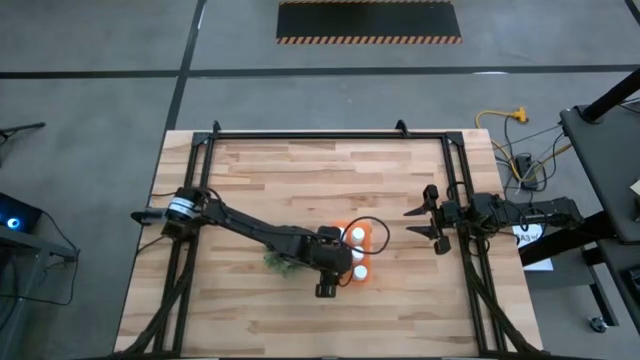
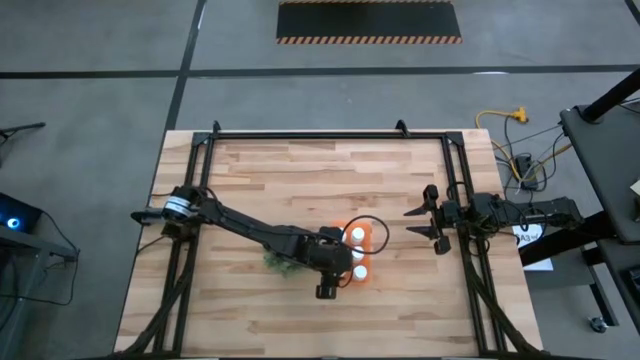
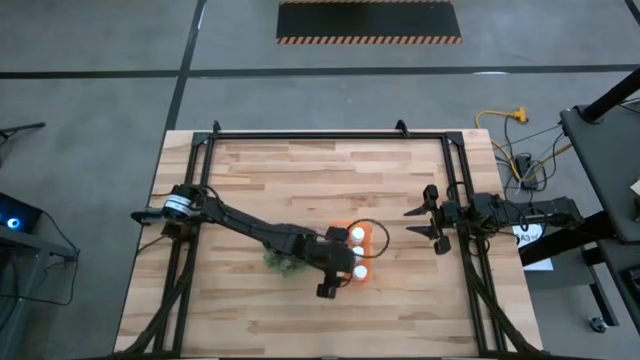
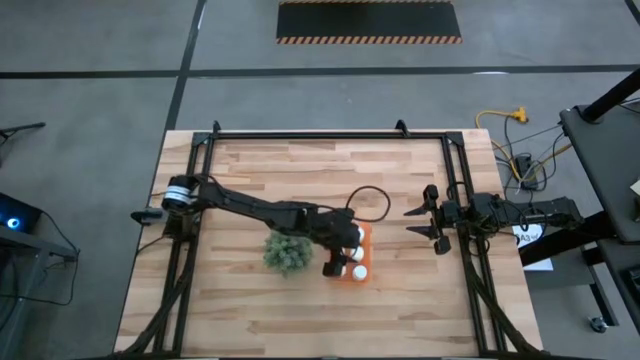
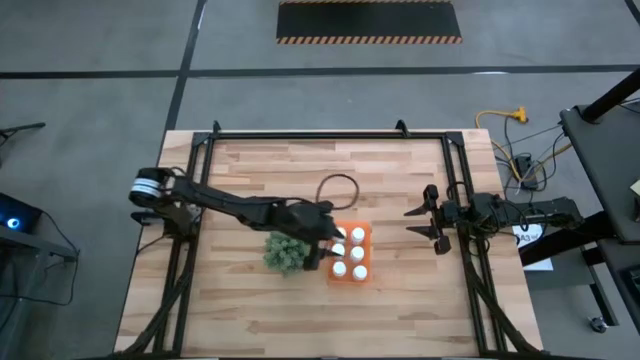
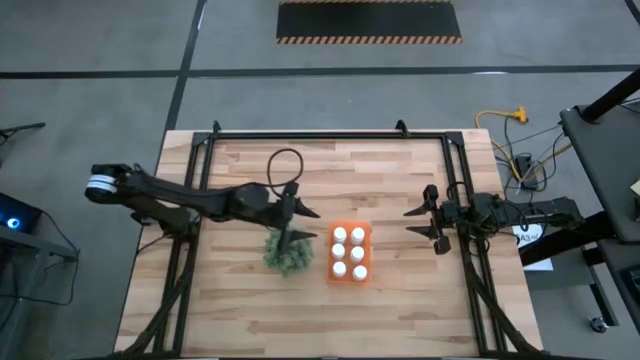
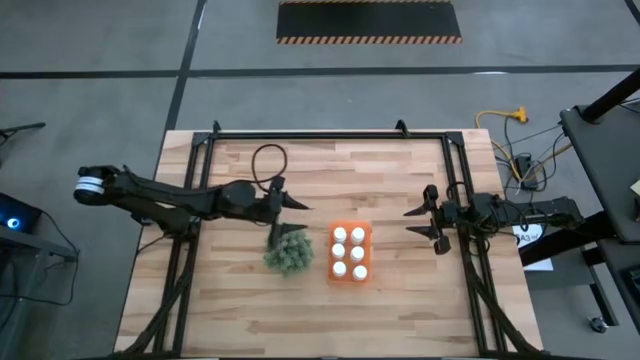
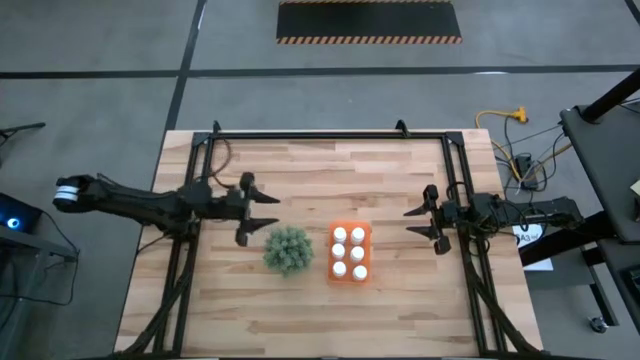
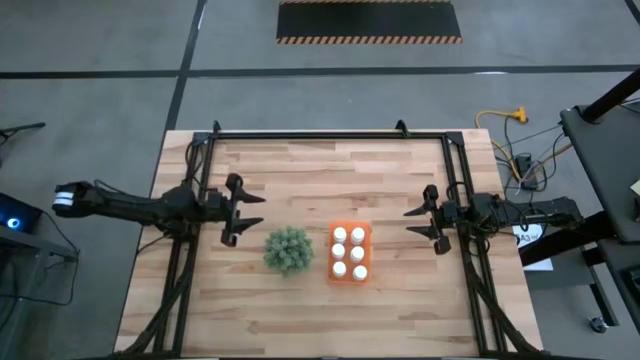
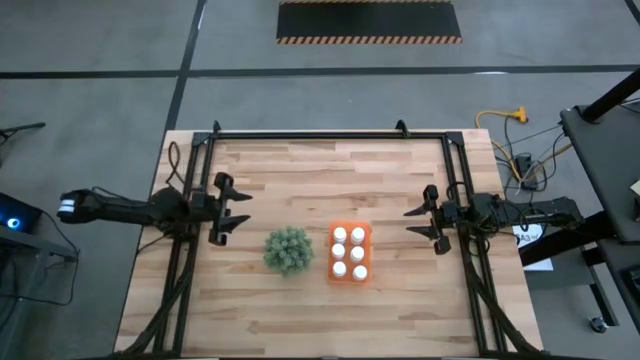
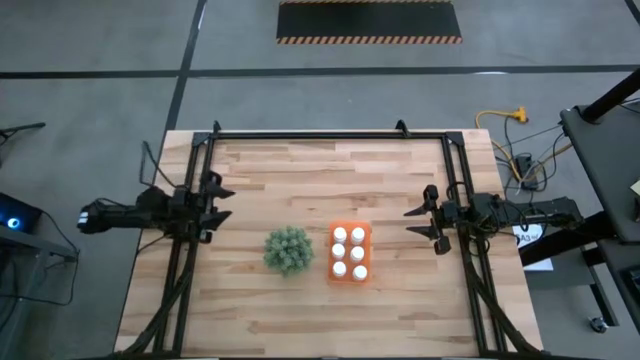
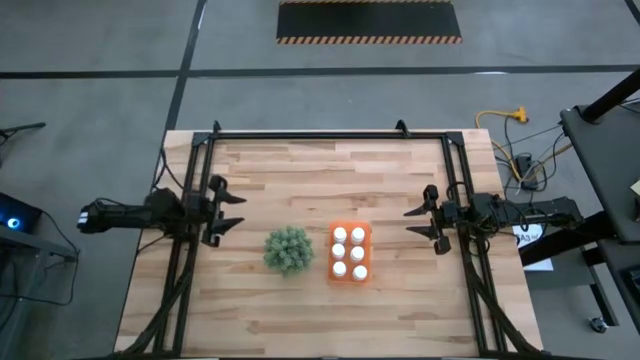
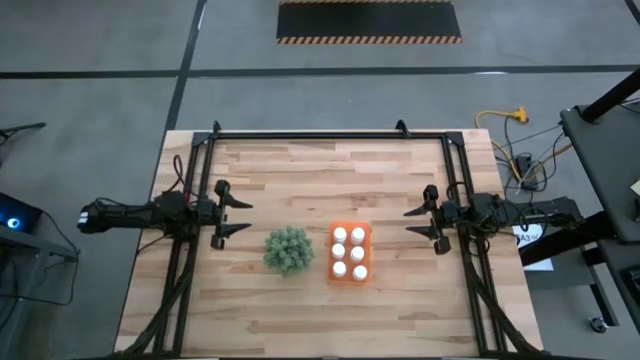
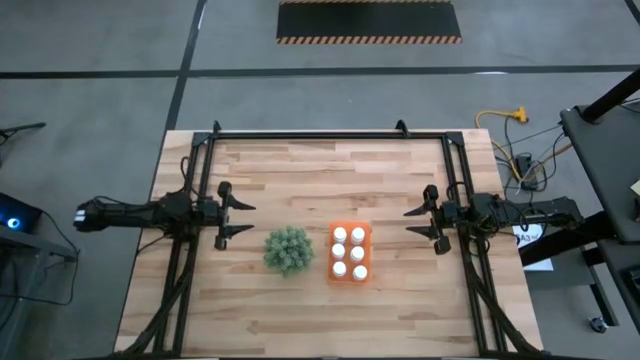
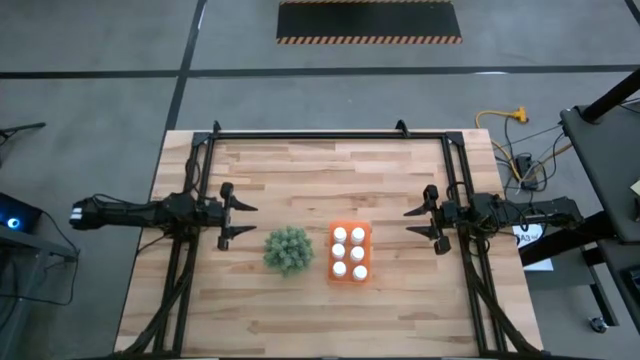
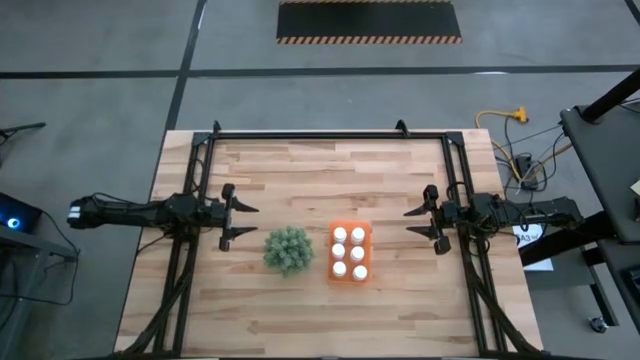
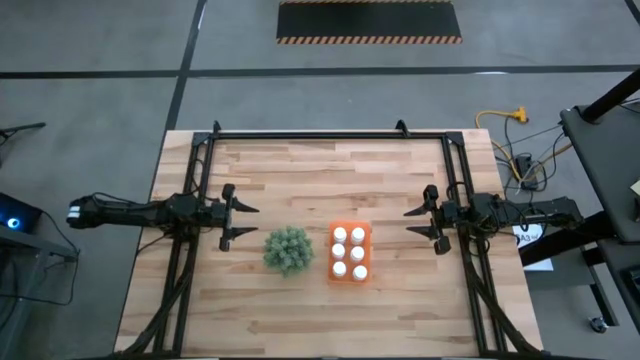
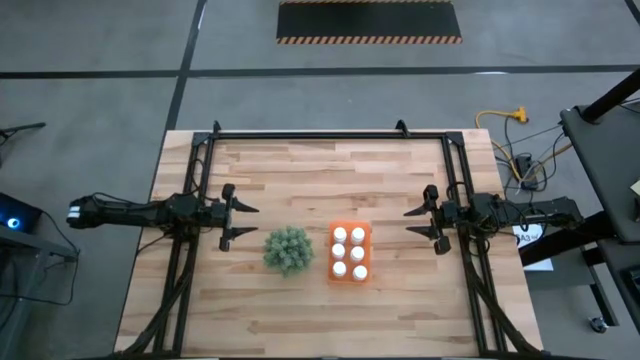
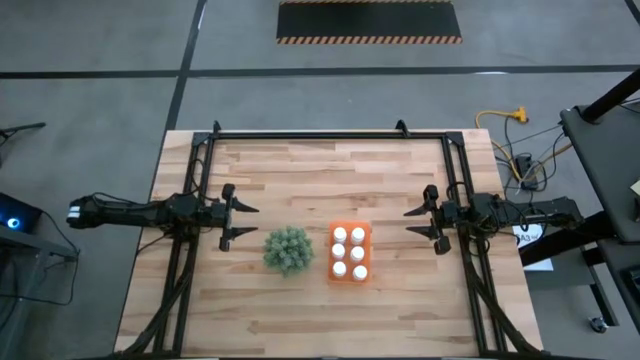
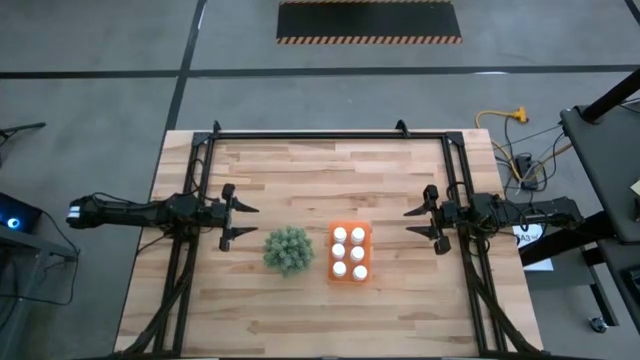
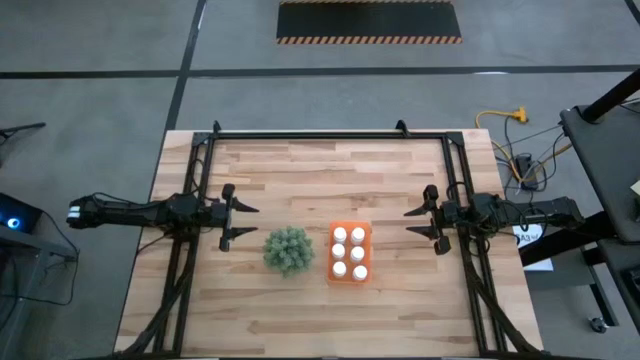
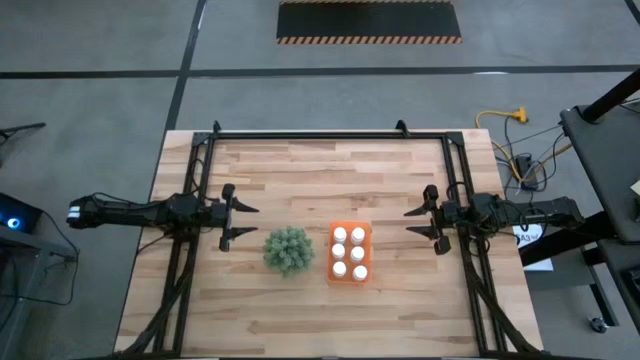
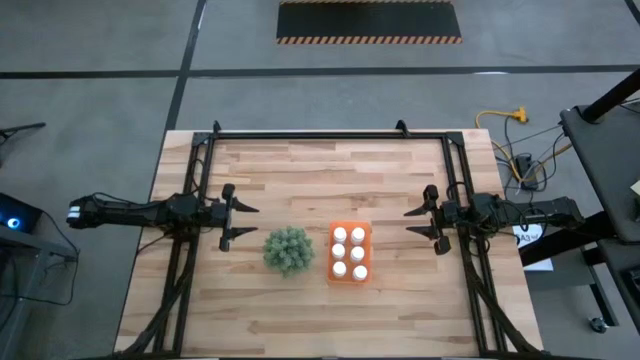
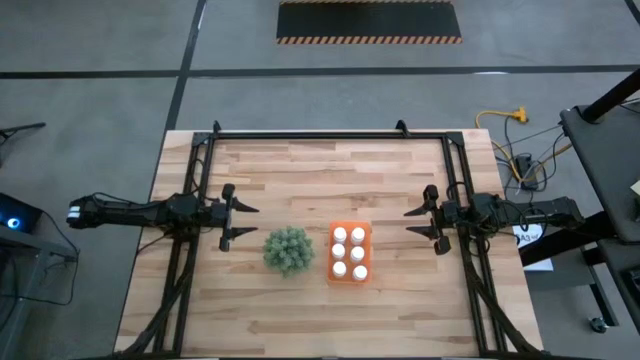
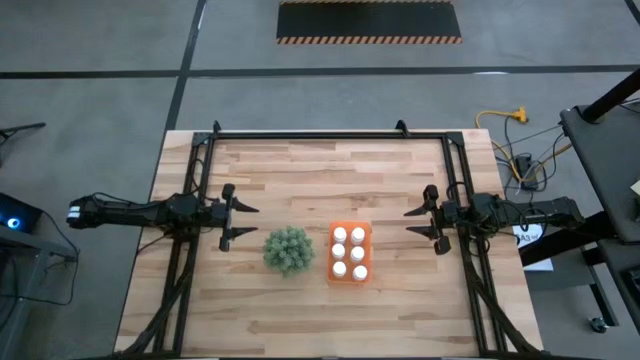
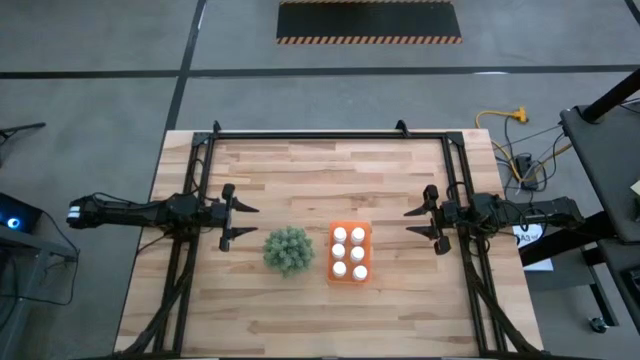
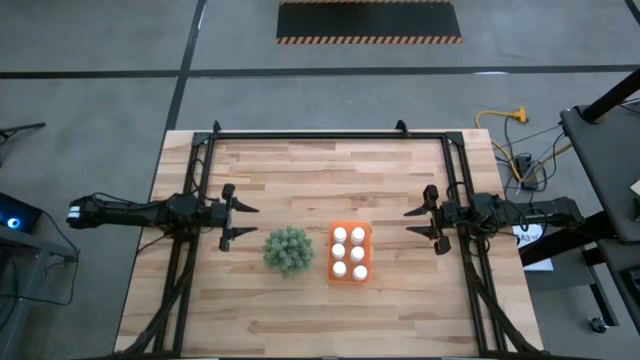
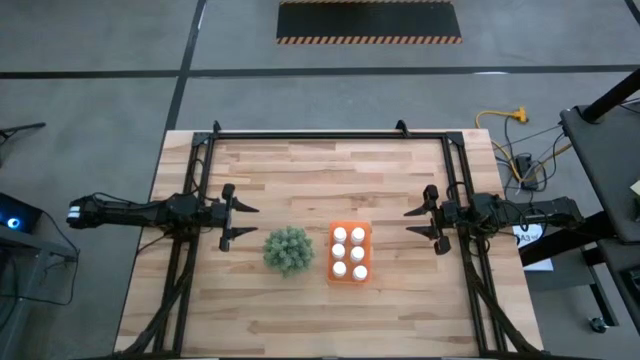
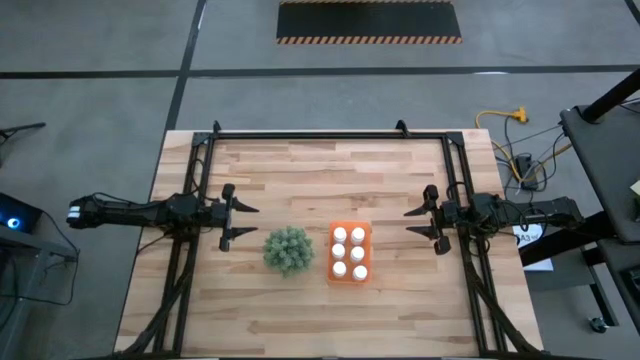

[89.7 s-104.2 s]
Task: Pick and place pill bottles into a basket
Return to Home Position

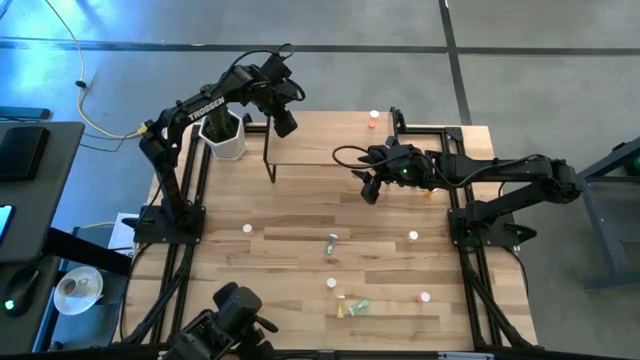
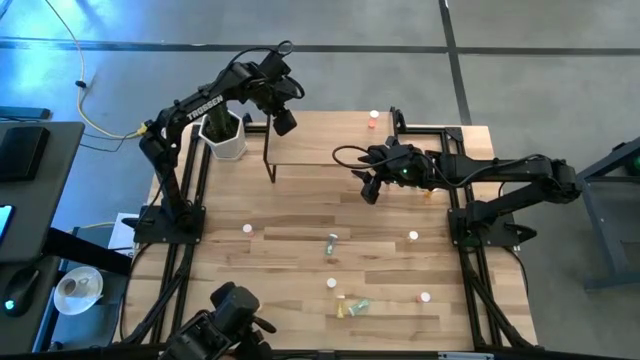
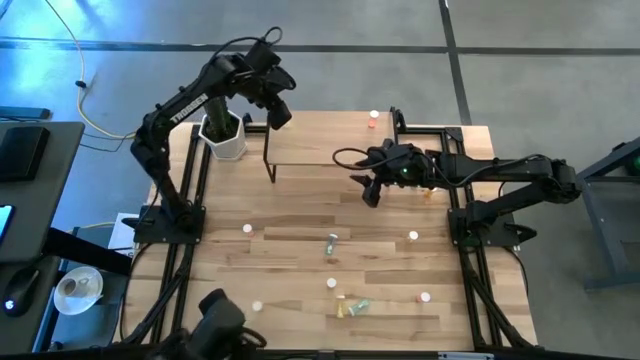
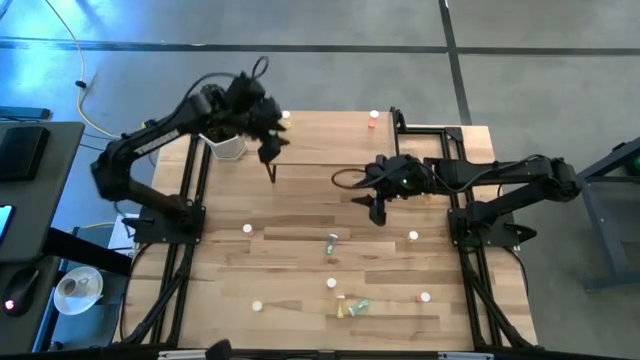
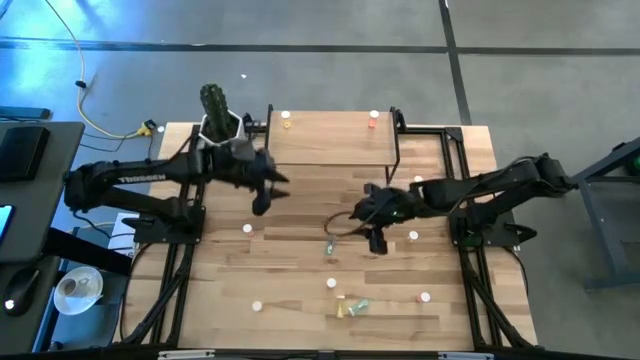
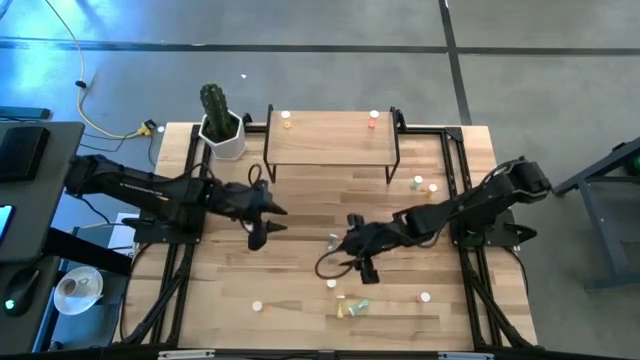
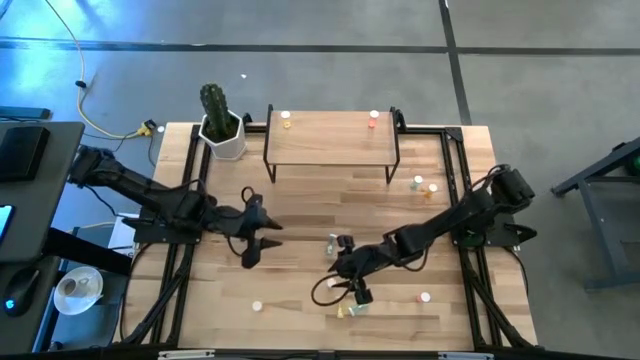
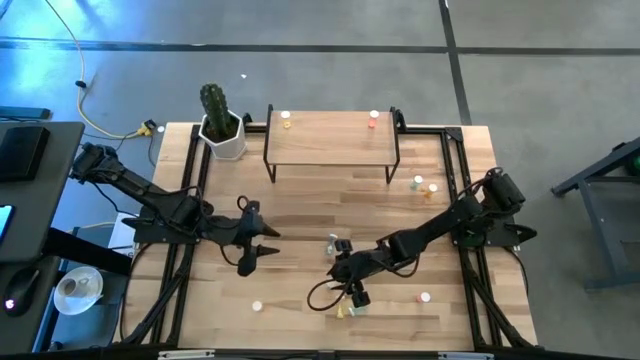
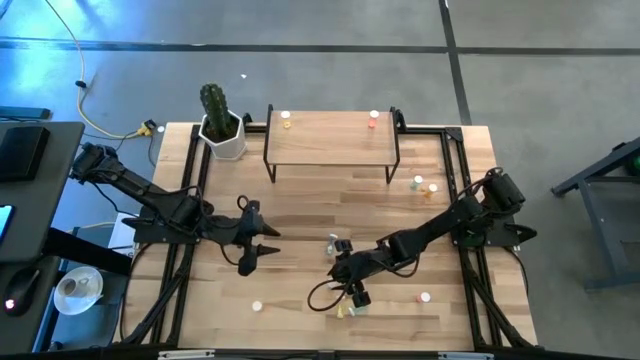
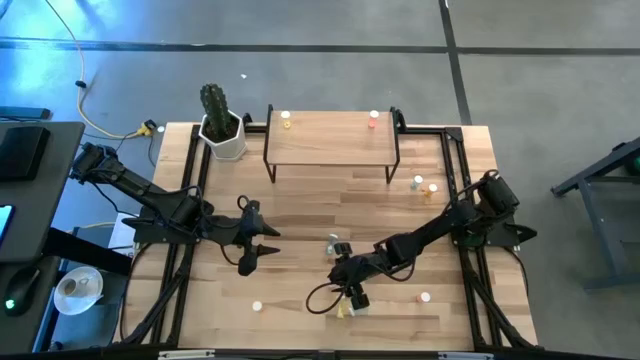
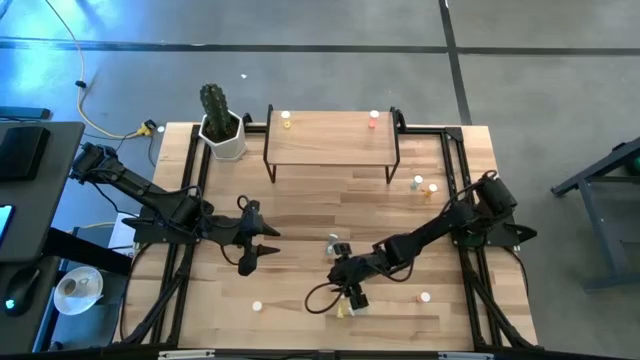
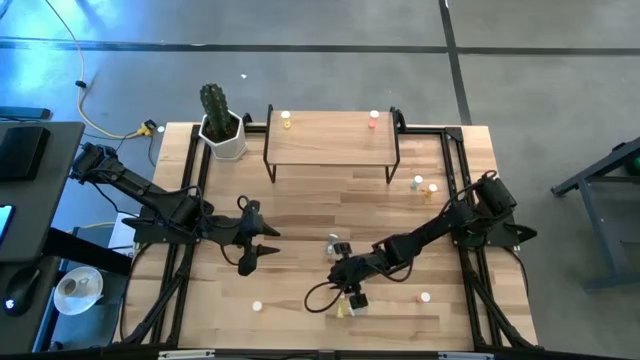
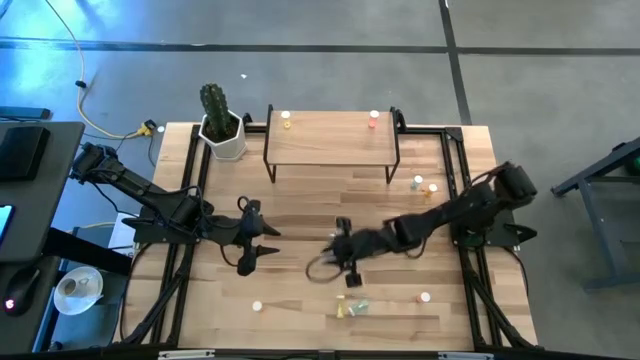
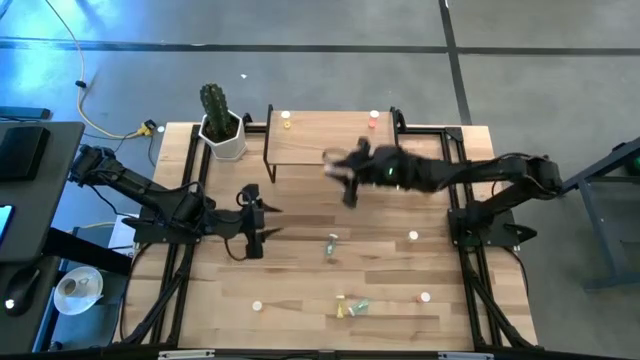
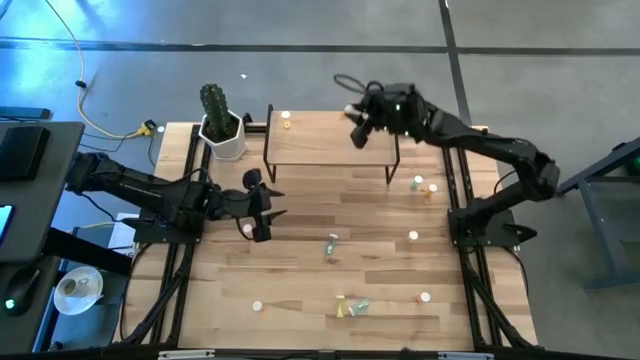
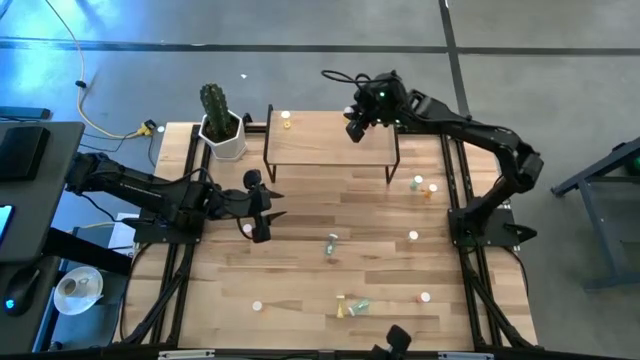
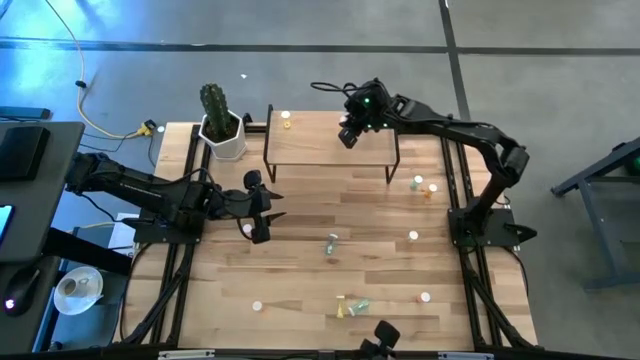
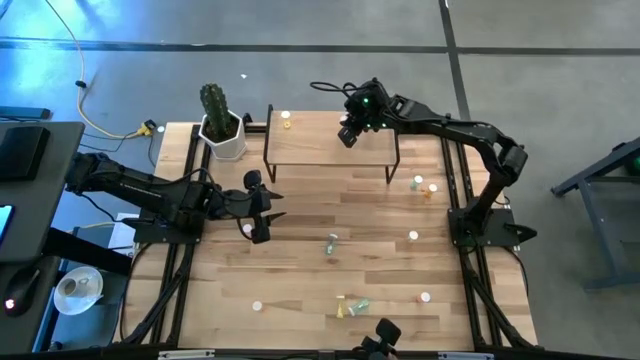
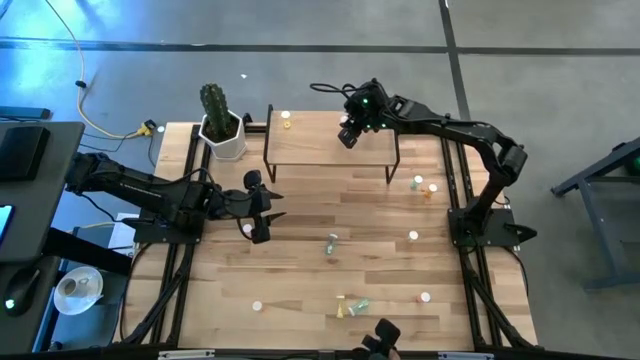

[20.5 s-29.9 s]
Task: Pick and place medicine bottles onto shelf by color
Put the bottom left orange pill bottle on the shelf
